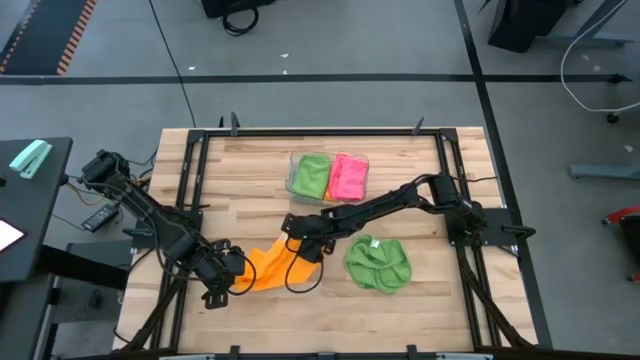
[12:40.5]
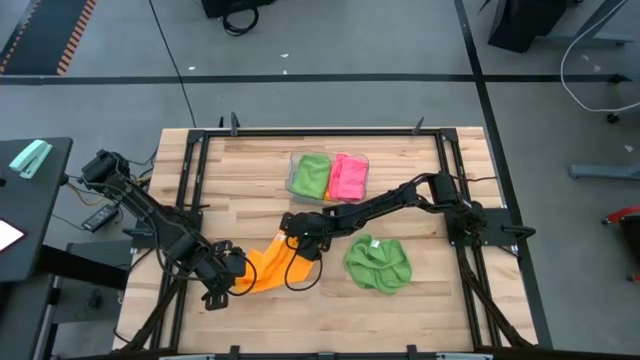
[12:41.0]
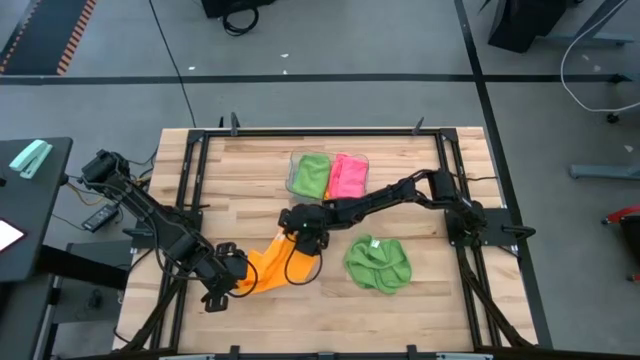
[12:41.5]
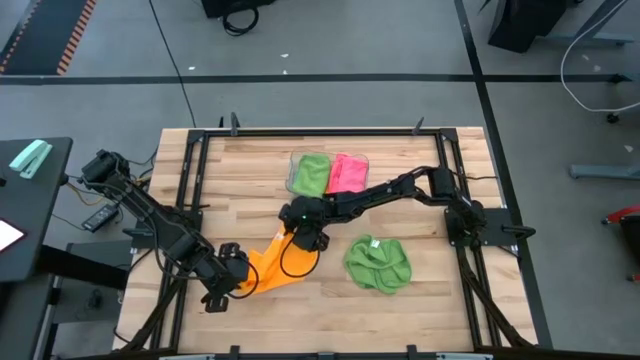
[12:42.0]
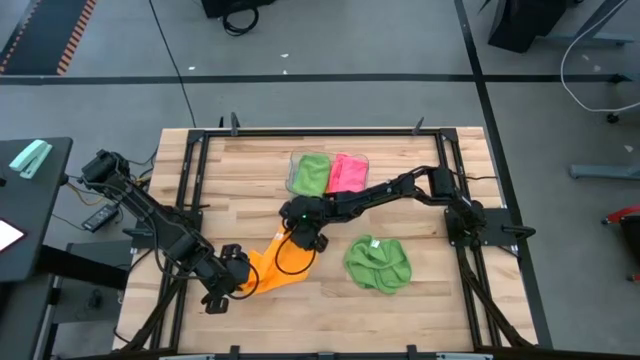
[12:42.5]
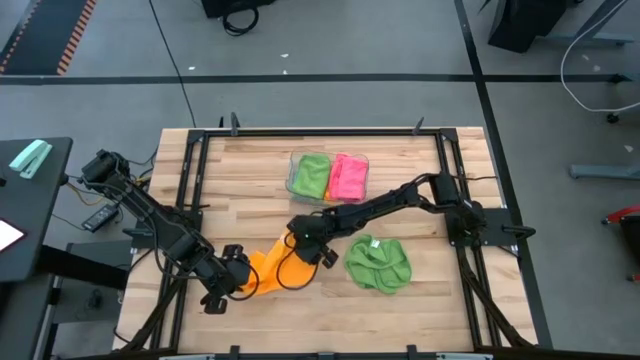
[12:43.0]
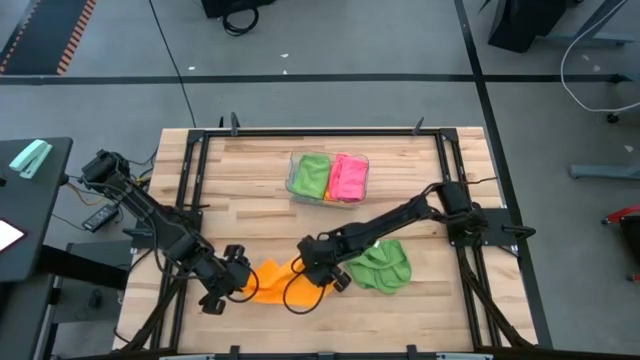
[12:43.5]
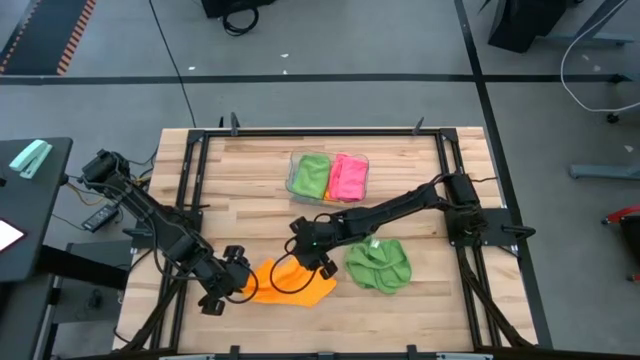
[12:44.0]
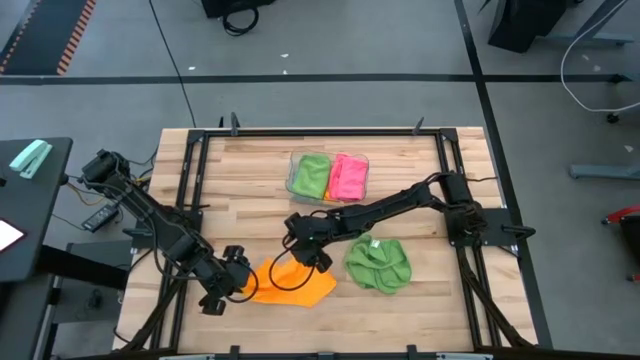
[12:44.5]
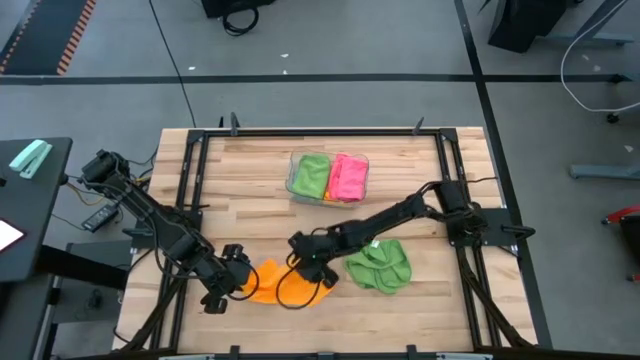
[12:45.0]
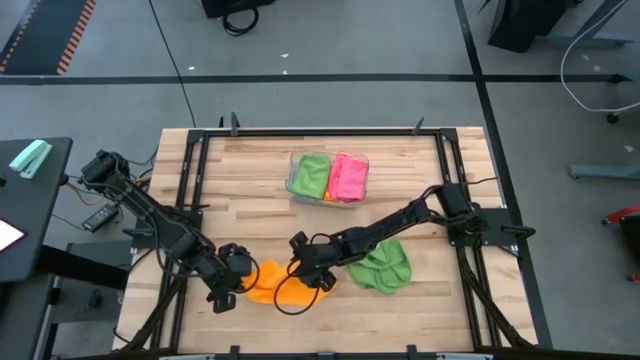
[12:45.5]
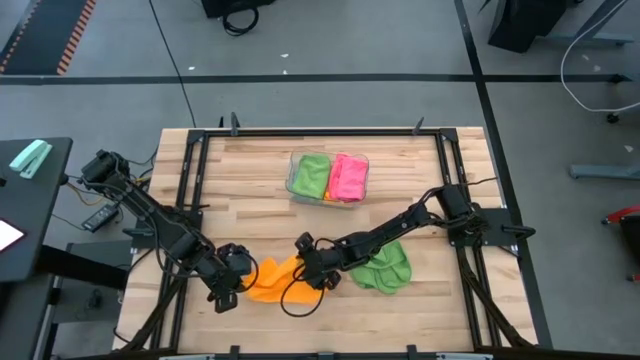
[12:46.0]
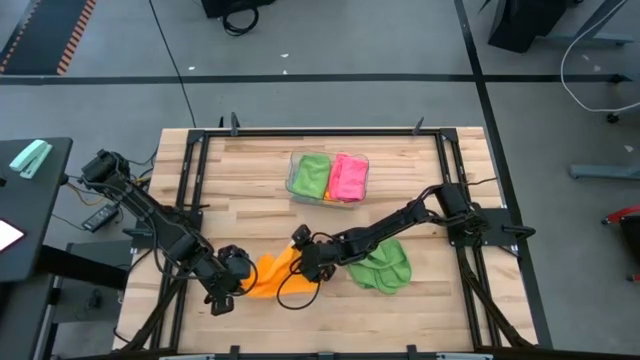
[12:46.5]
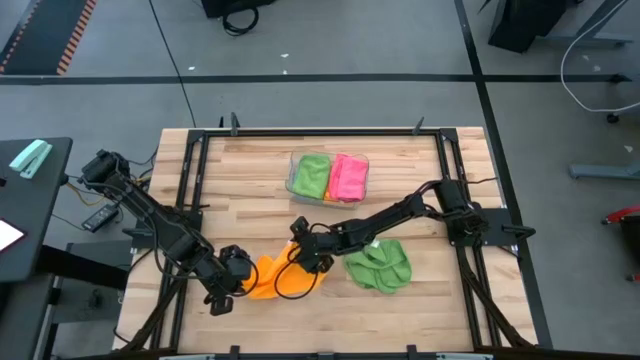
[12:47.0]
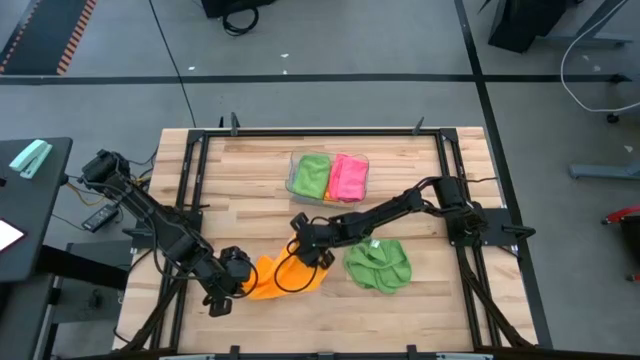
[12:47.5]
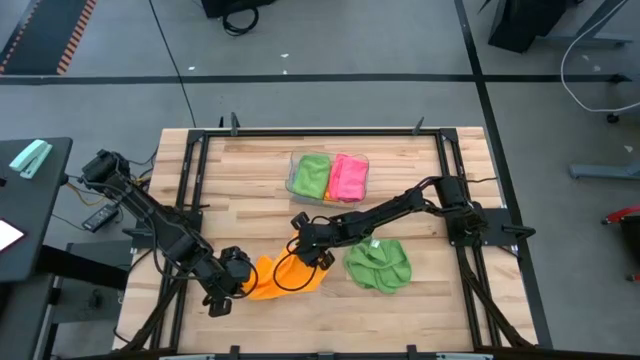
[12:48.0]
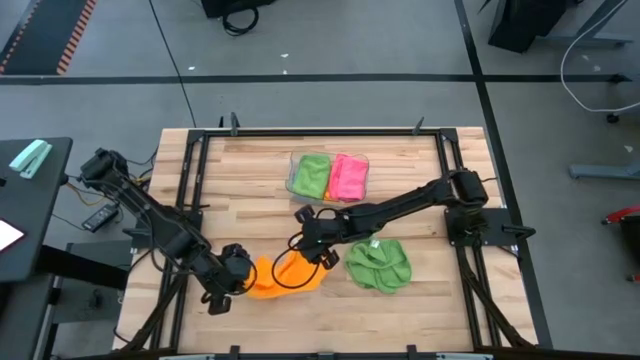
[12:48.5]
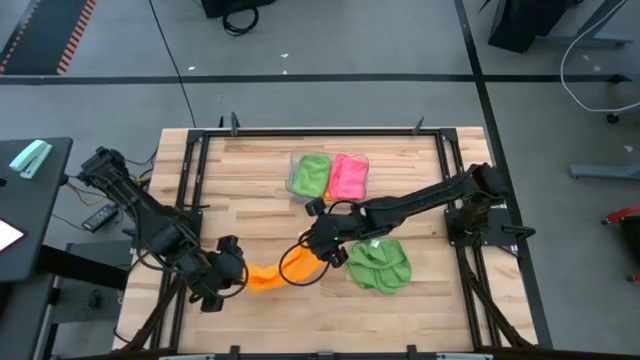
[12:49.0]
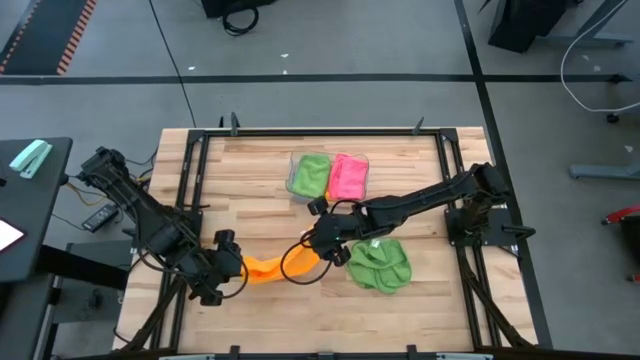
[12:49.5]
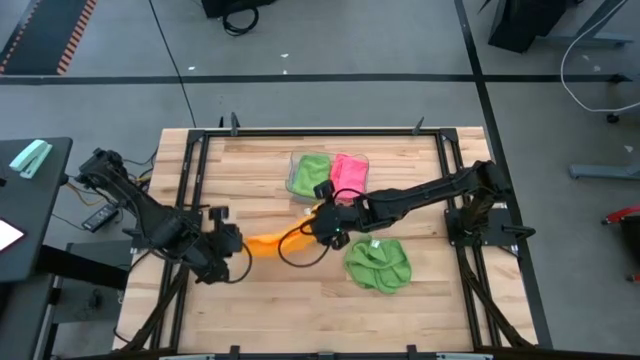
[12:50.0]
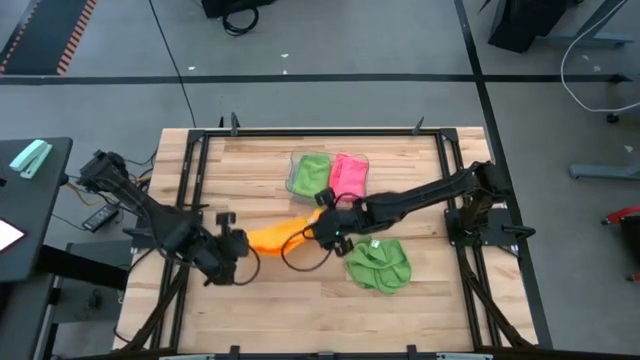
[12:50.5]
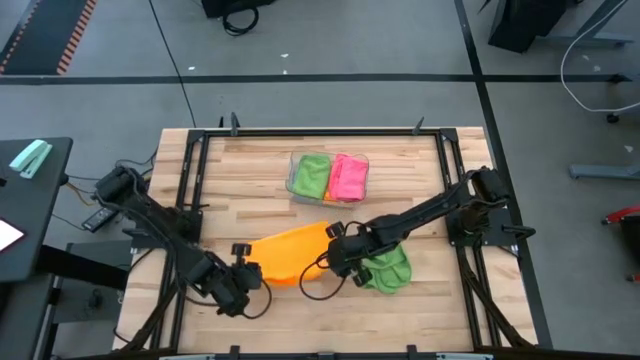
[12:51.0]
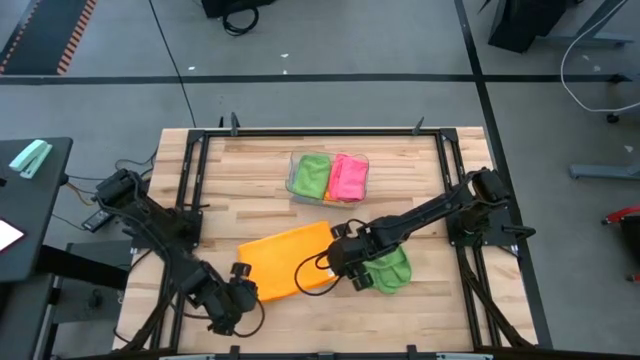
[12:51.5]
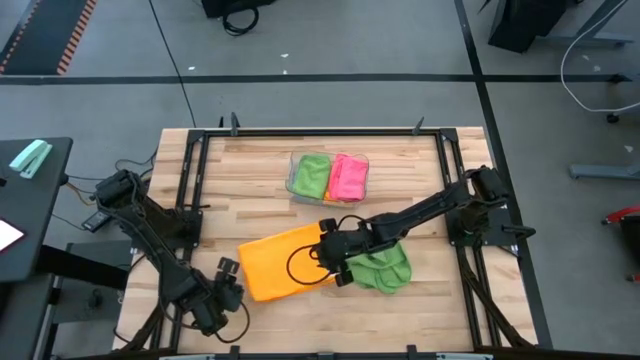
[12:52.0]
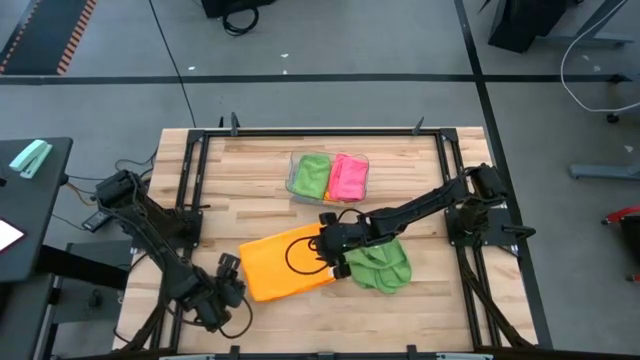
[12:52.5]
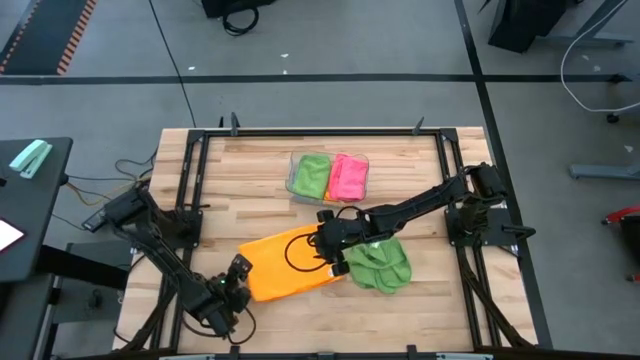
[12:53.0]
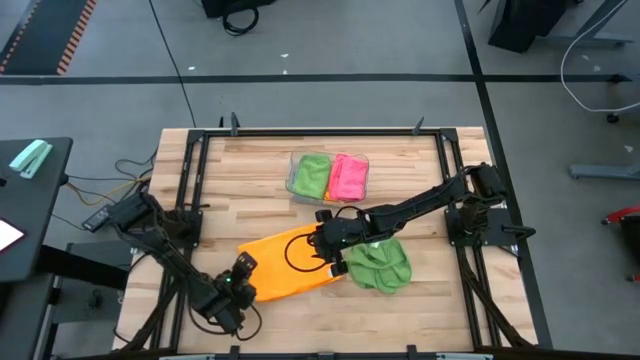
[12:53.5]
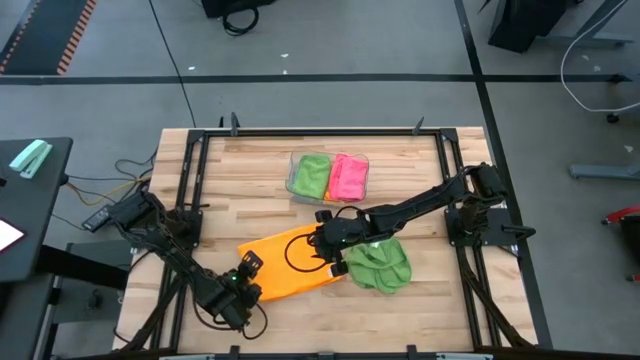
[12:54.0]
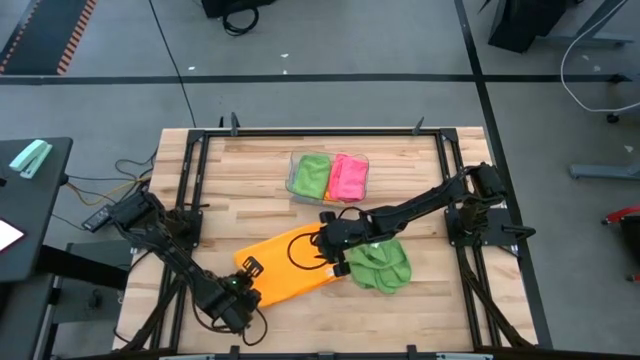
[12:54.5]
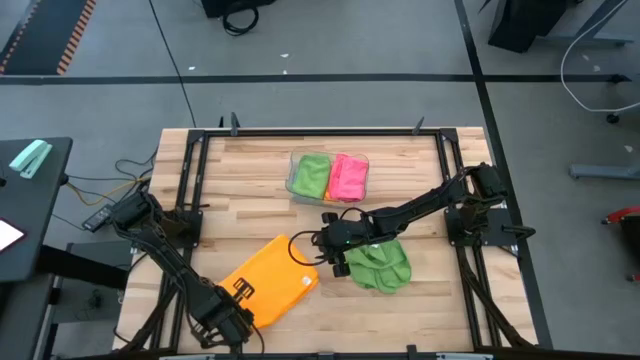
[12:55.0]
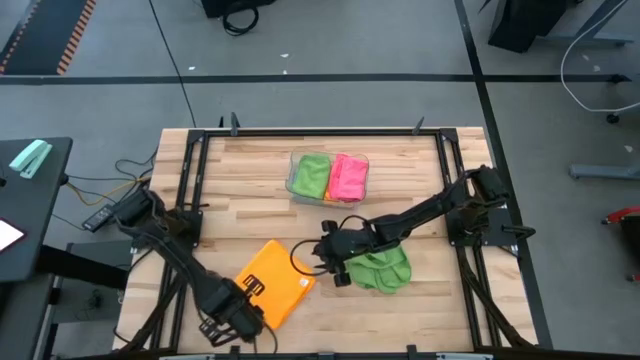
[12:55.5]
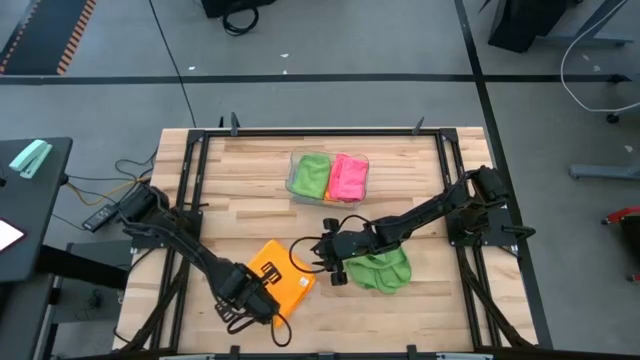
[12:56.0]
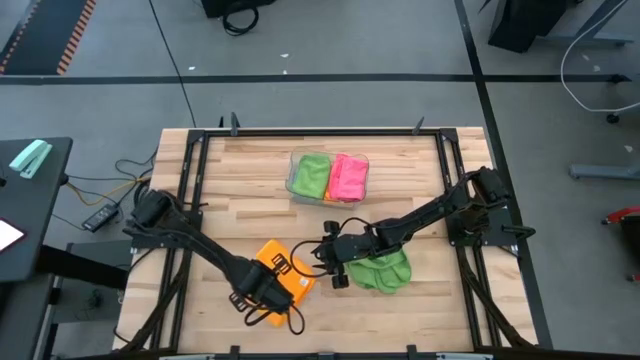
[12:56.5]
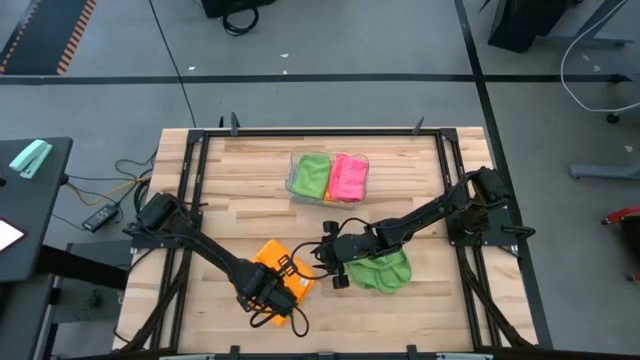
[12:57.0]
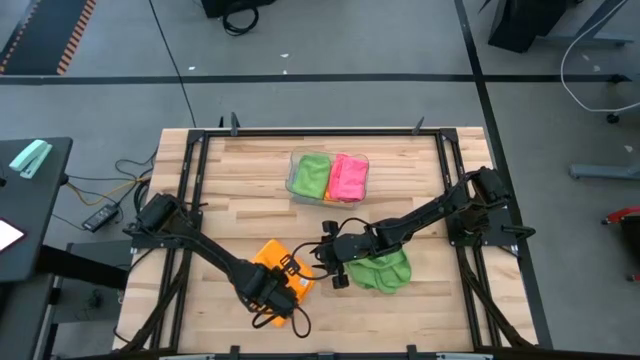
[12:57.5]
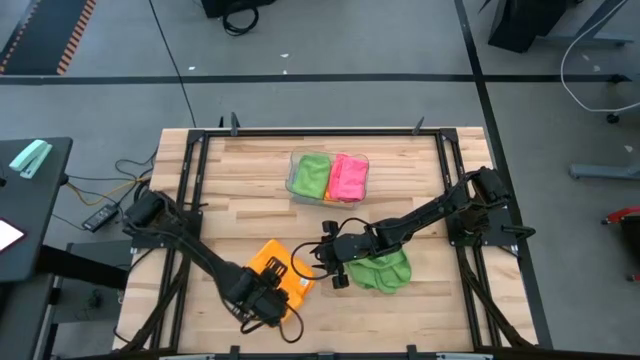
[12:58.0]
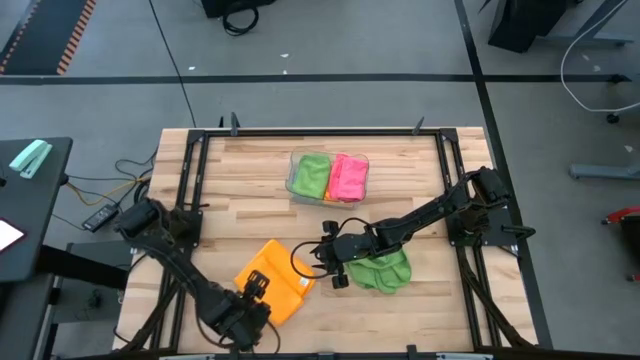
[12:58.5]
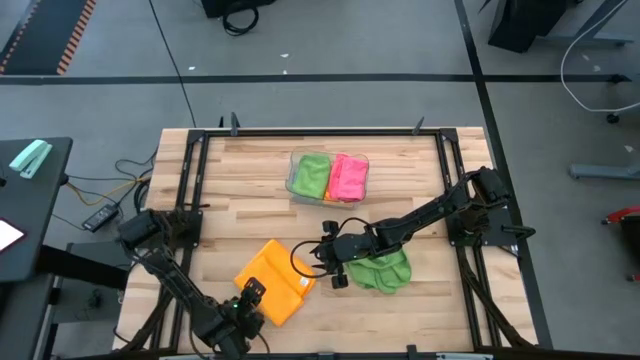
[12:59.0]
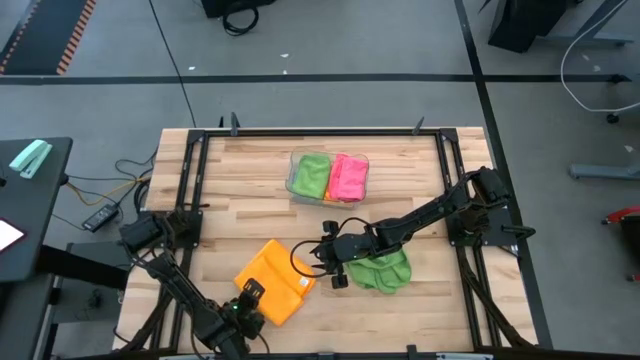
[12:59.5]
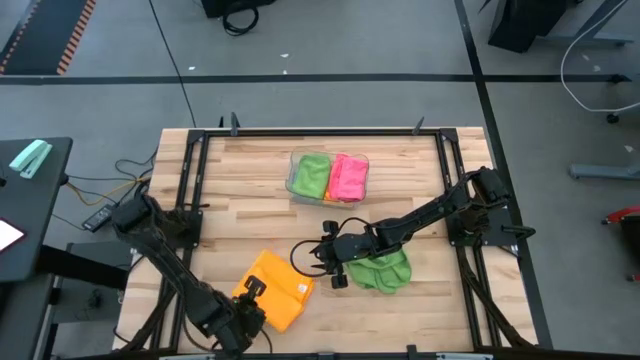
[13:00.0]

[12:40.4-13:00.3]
Task: Fold microfiber towels
Fold the yellow microfiber cloth
